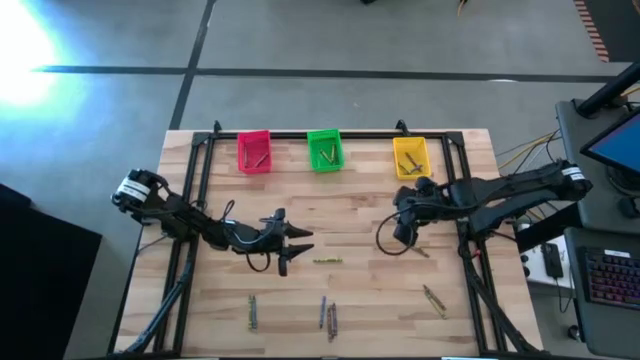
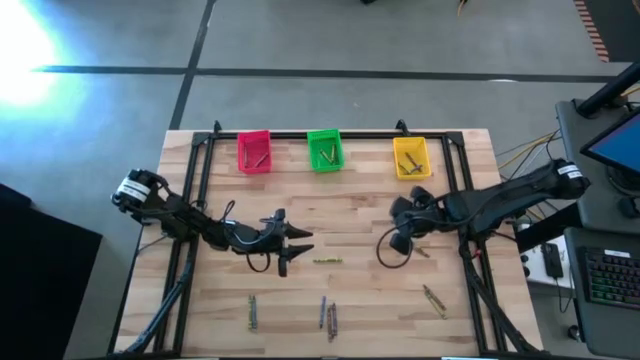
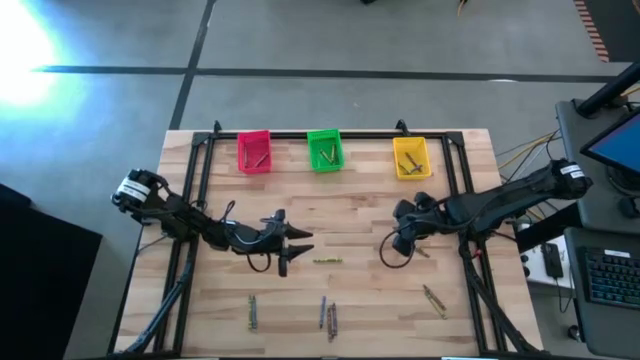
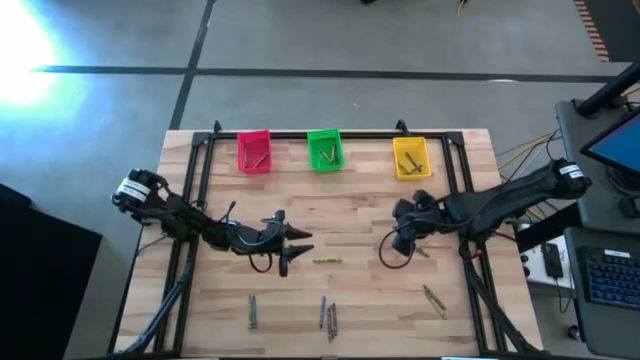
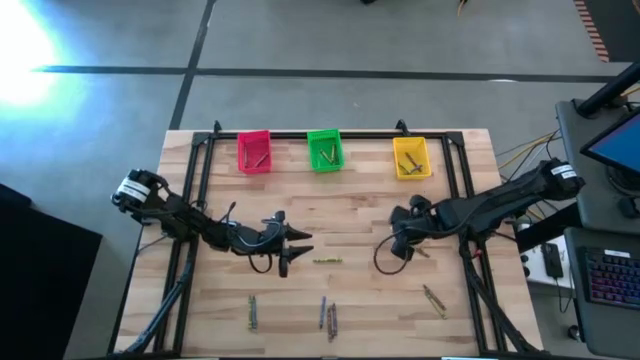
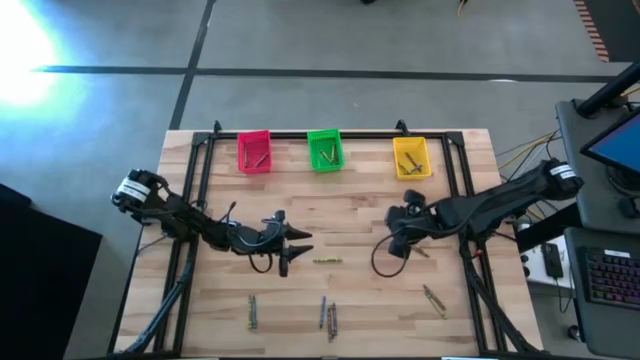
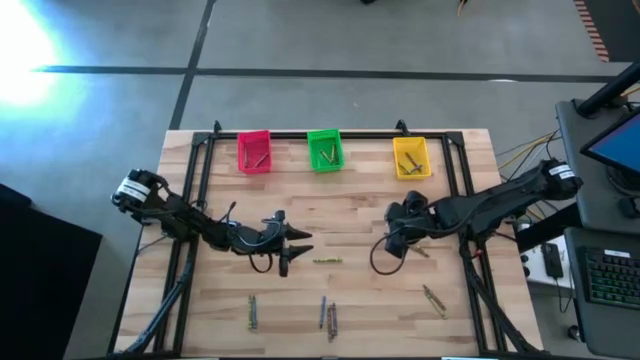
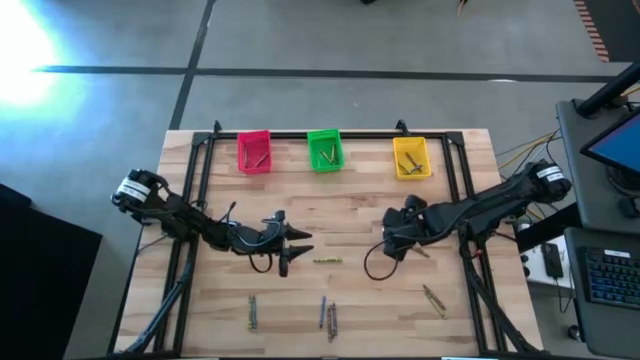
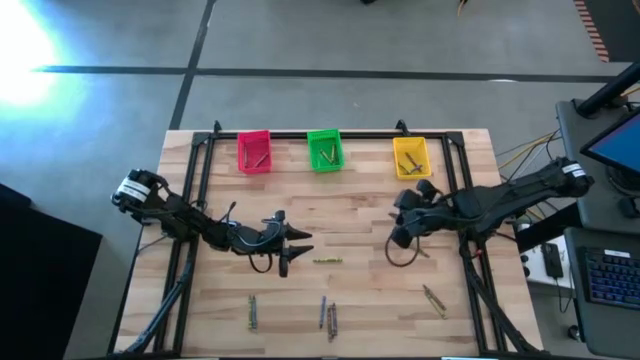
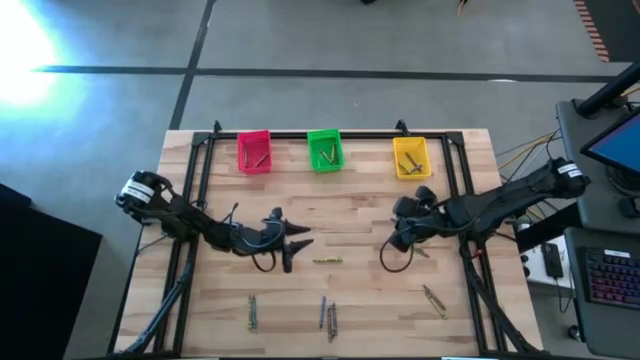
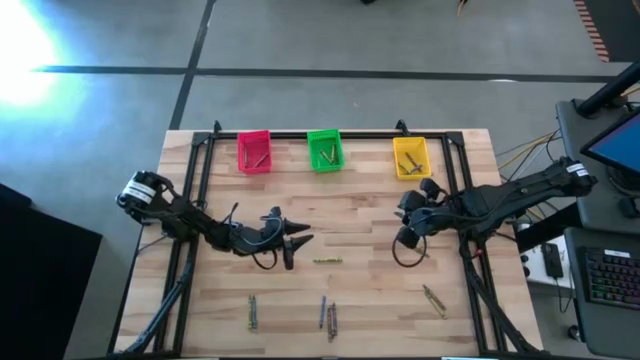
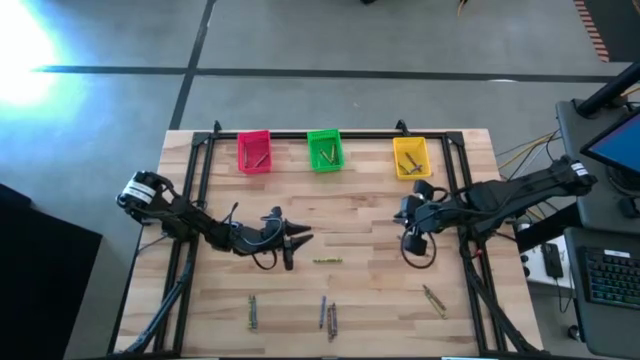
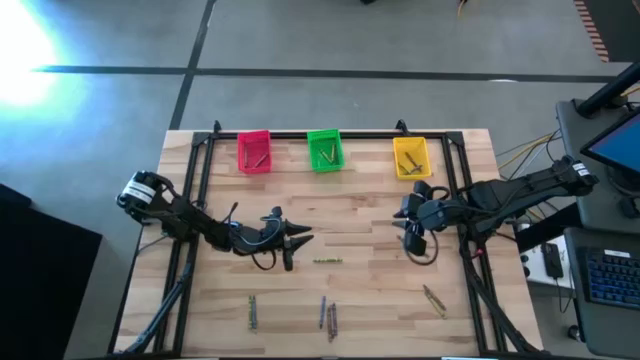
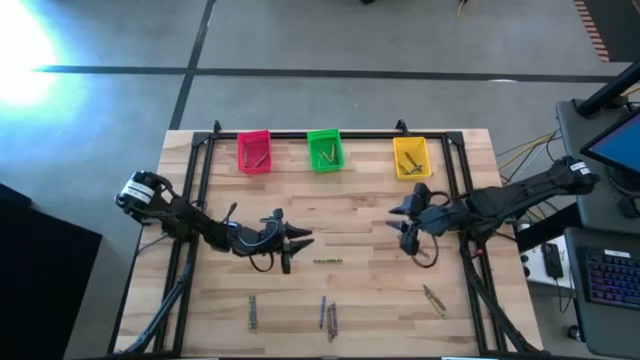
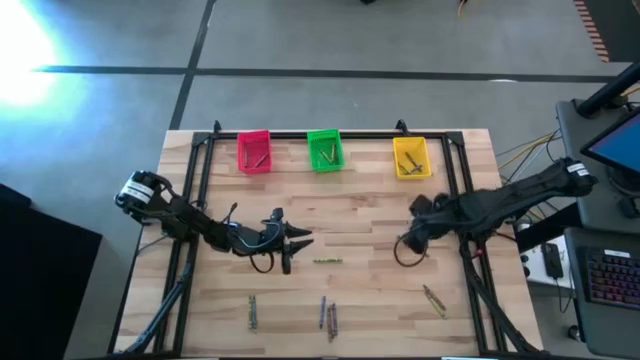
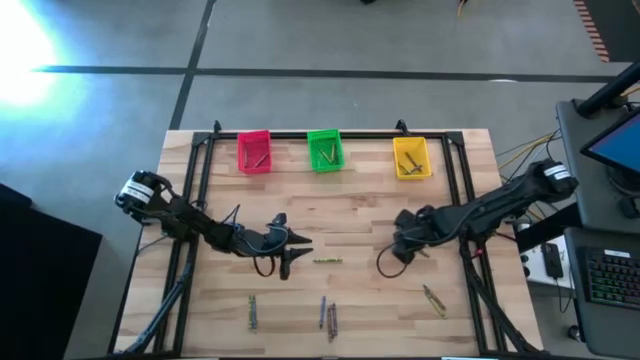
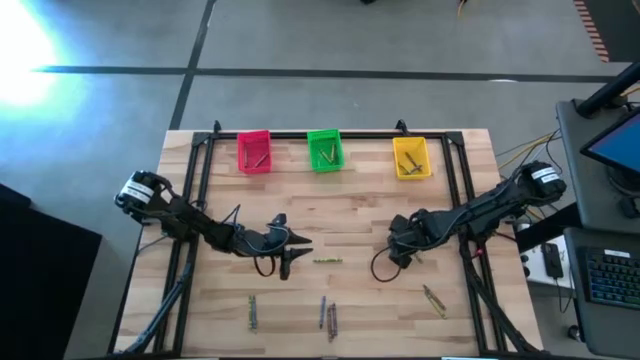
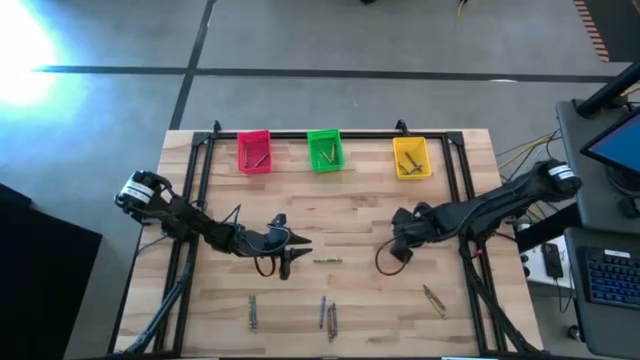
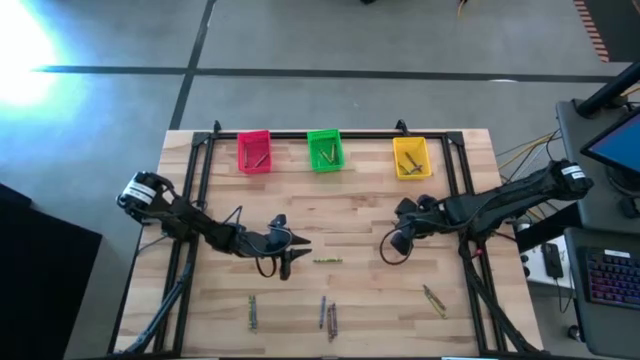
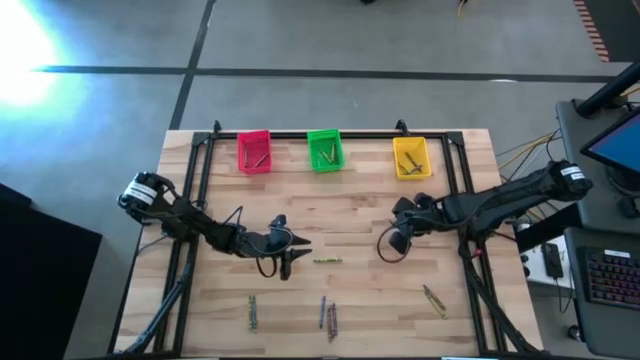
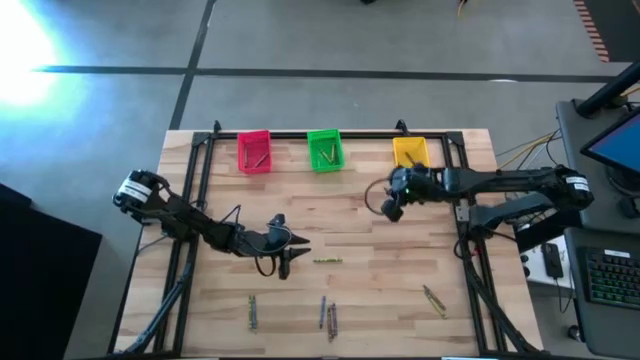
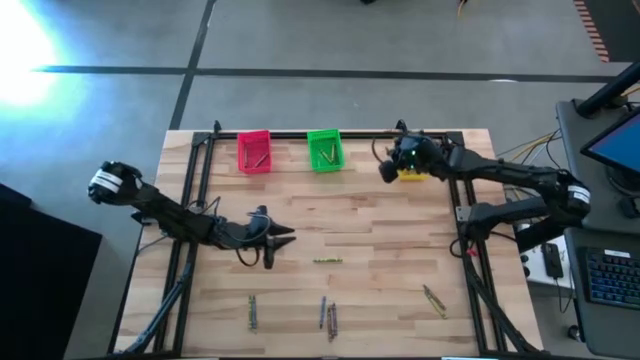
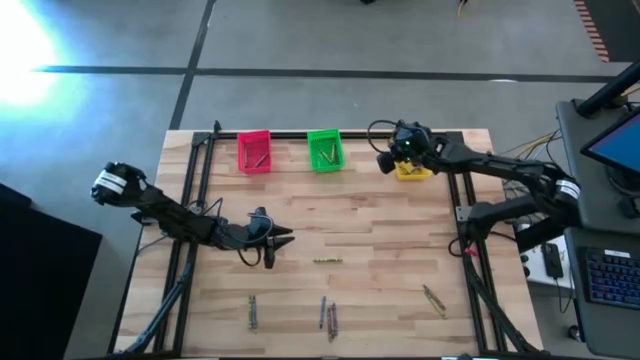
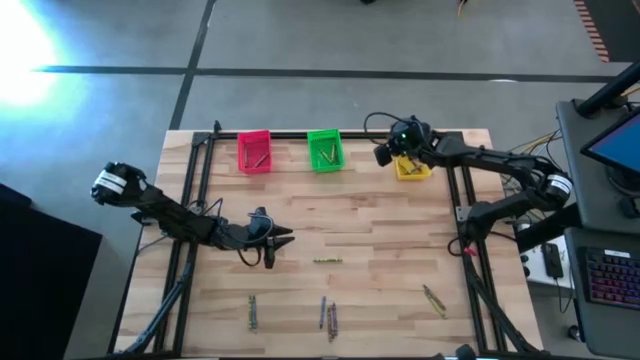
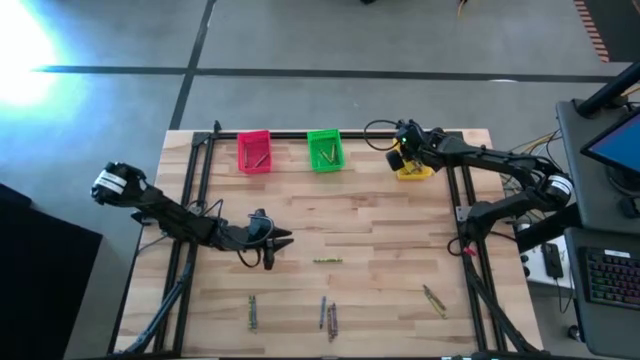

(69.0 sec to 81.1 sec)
Task: Sort crayons
Put the green crayon into the yellow basket

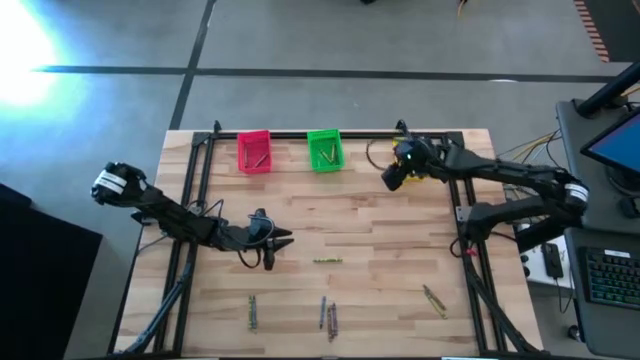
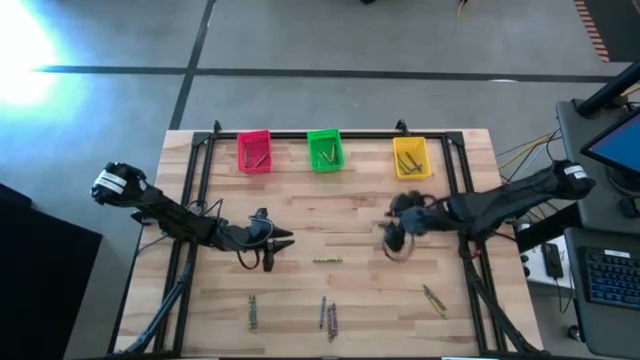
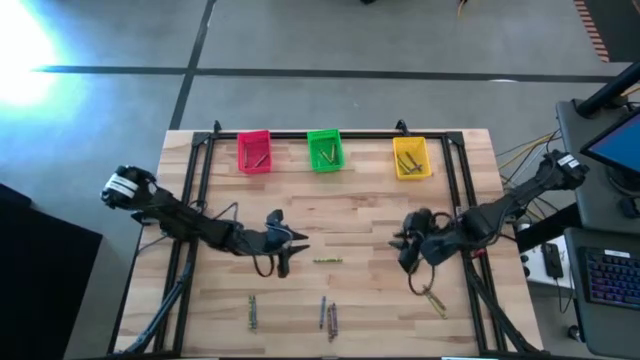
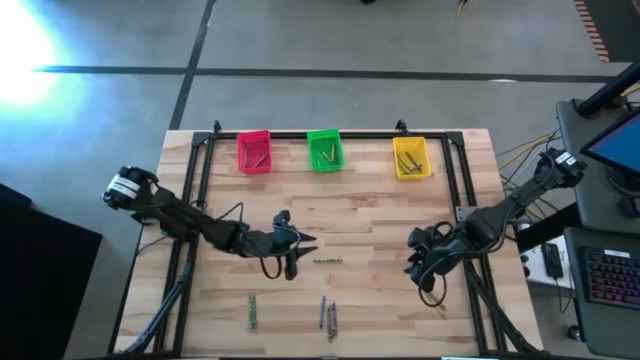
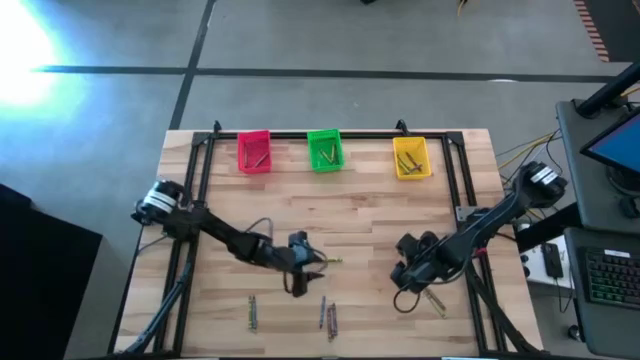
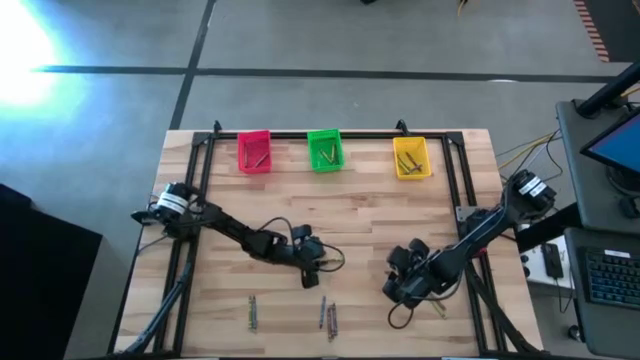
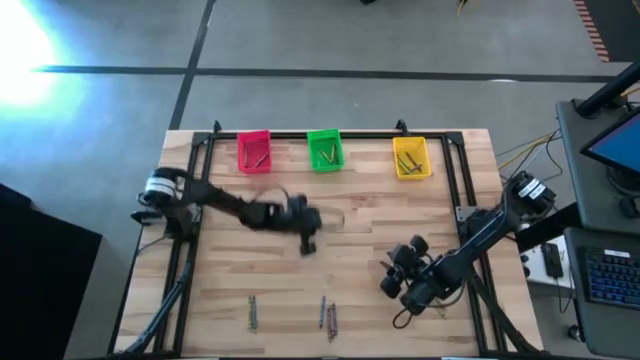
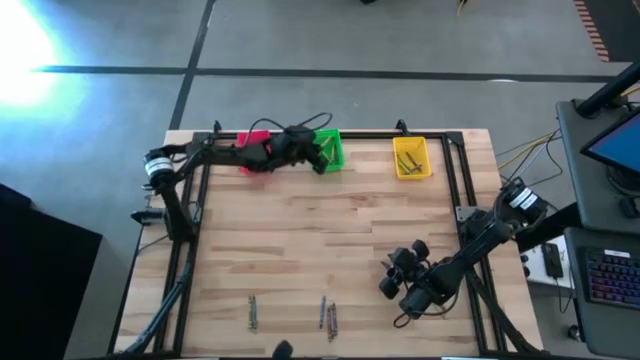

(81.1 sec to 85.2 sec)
Put the green crayon into the green basket

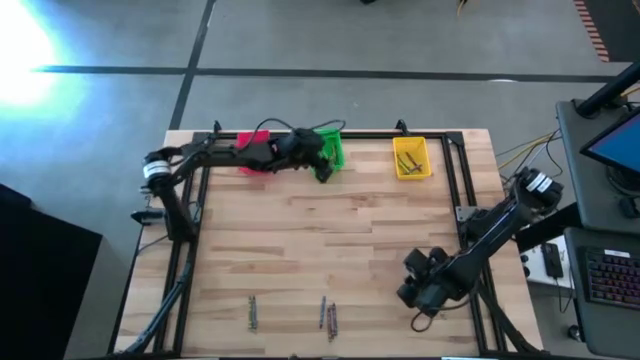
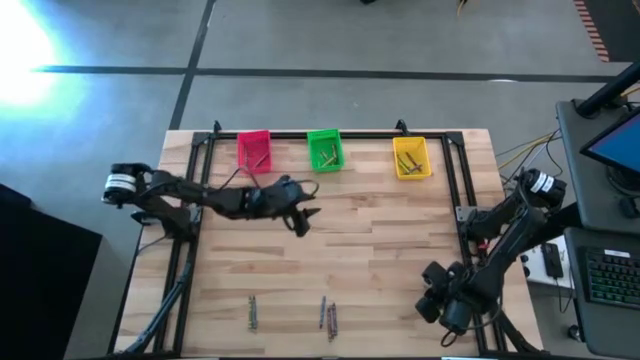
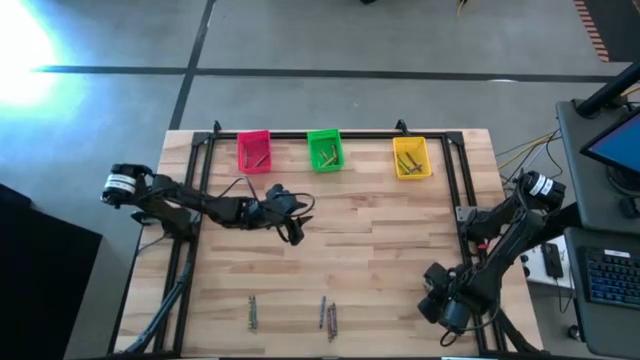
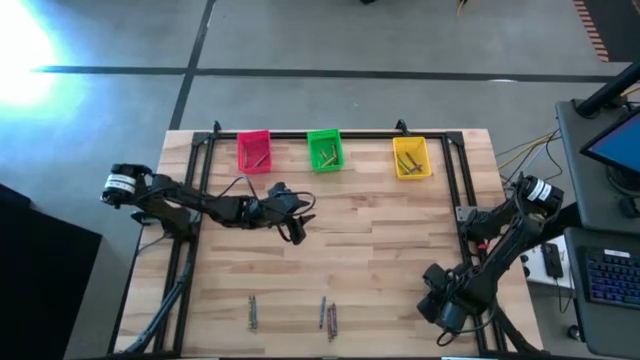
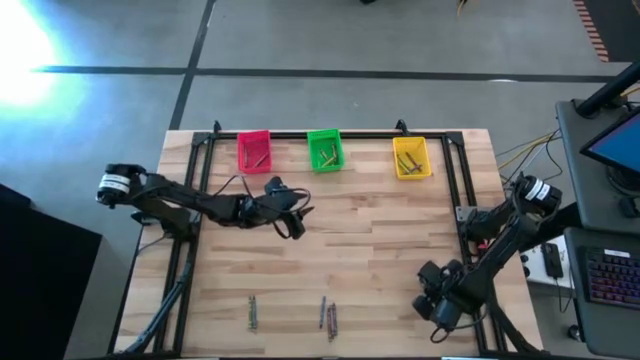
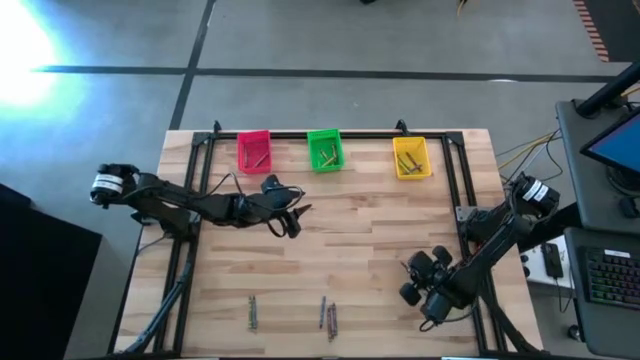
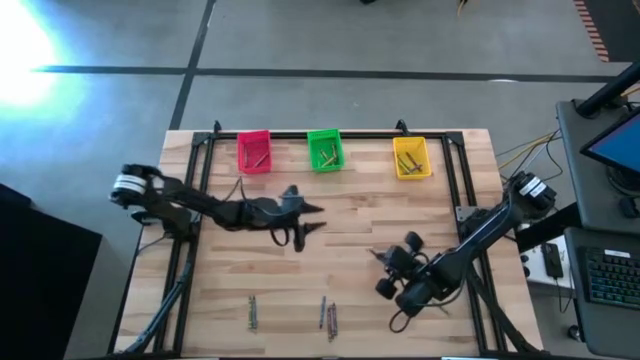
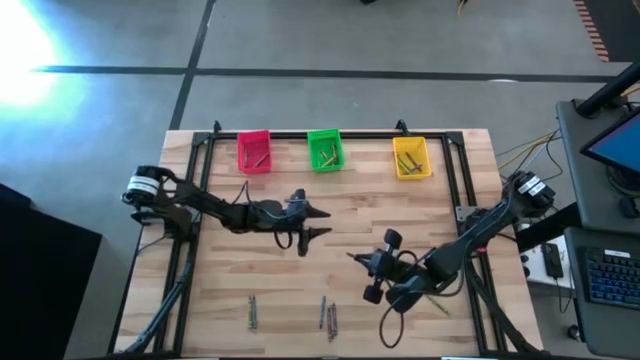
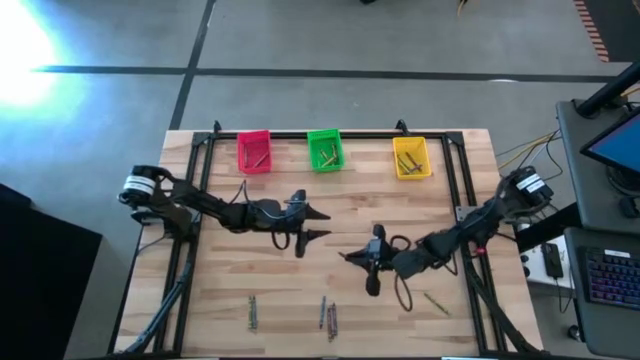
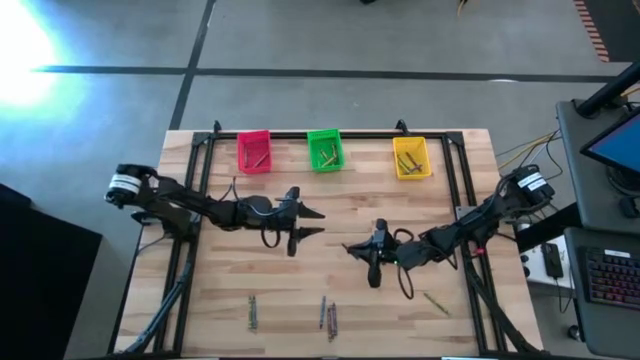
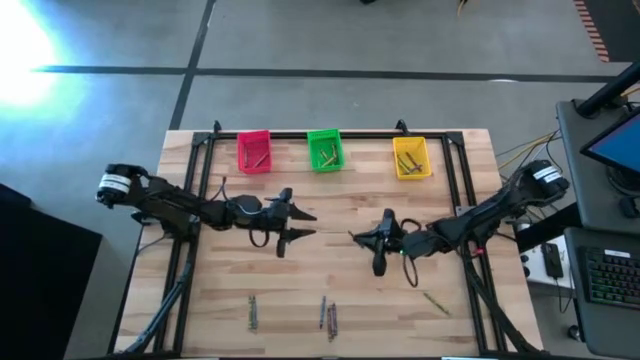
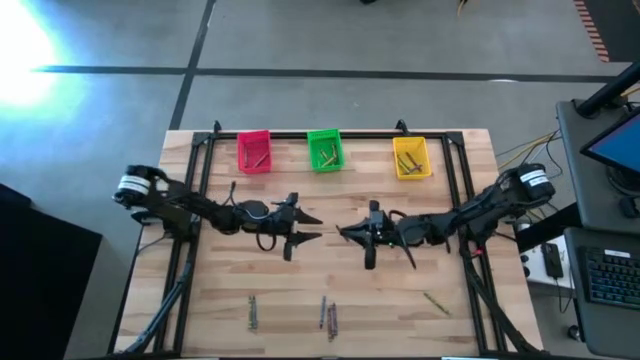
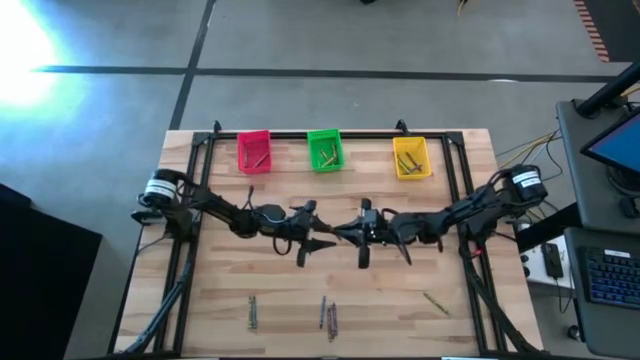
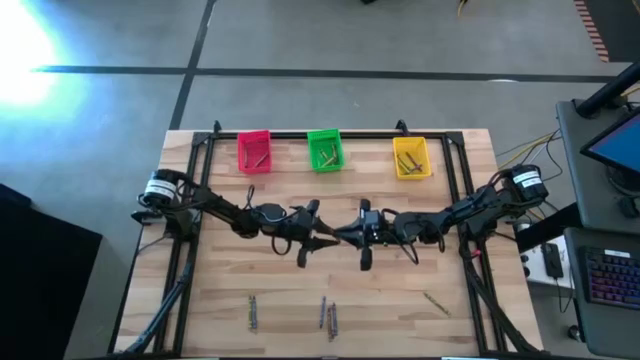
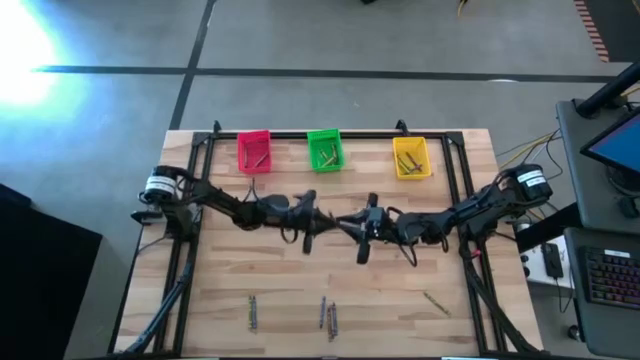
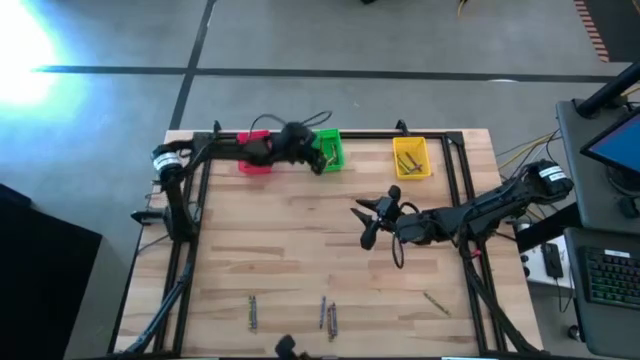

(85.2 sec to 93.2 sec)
Put the brown crayon into the green basket
